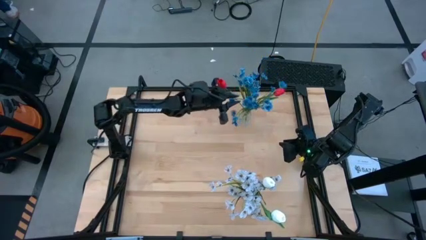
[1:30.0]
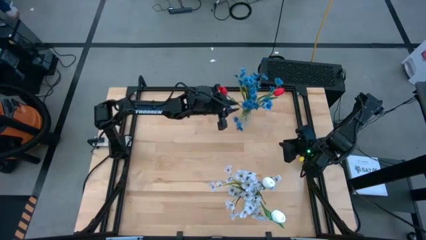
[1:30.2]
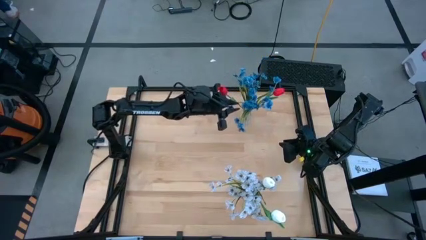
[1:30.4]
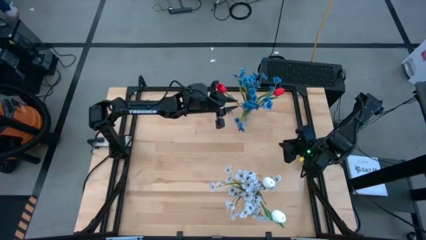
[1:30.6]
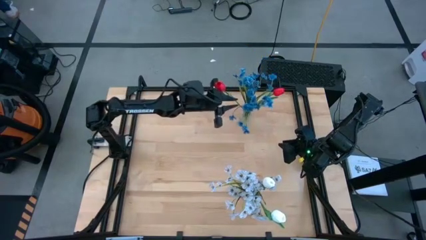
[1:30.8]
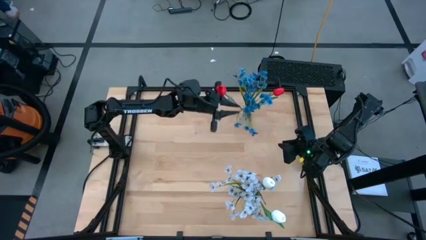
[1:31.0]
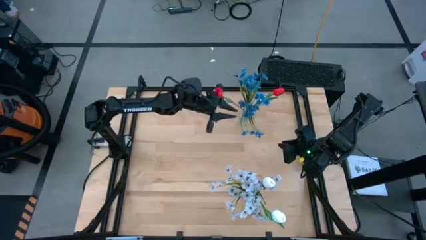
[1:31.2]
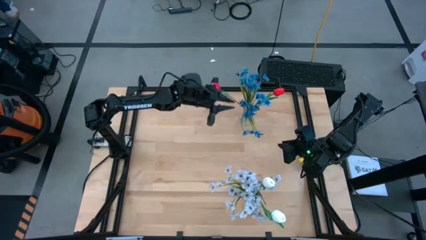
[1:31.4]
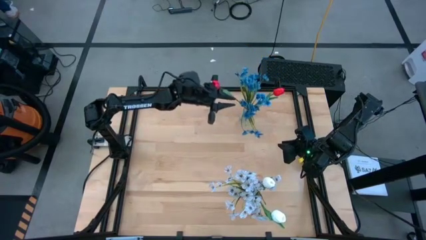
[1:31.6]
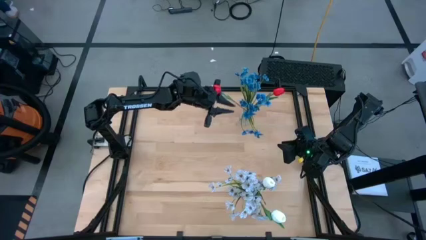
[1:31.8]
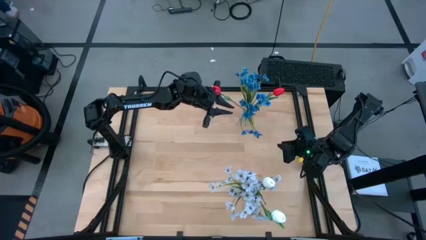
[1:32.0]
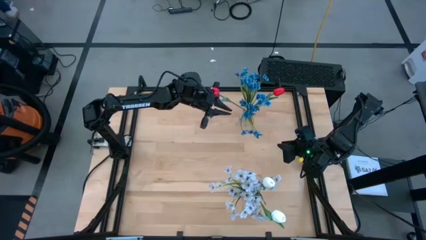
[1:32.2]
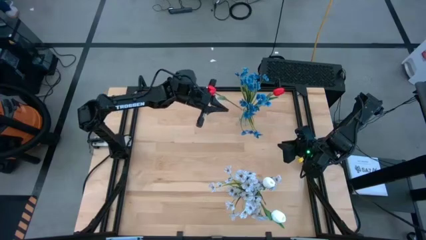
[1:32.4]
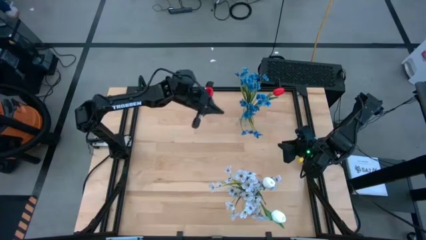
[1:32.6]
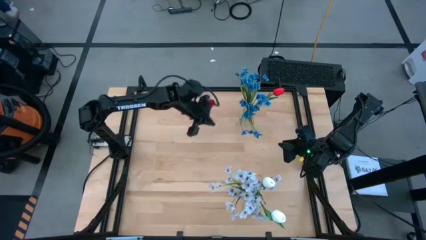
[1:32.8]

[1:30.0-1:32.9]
Task: Sort flowers into vase by color
Put the red flower into the transparent vase

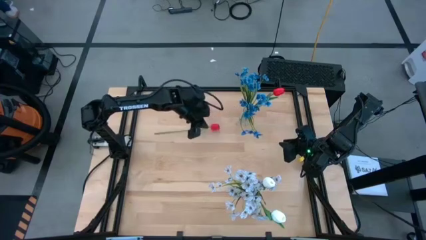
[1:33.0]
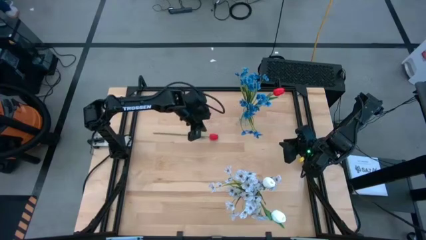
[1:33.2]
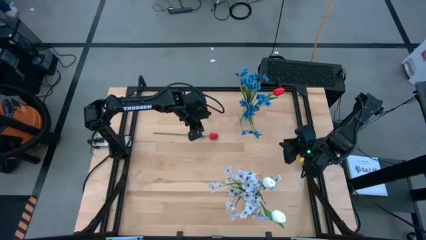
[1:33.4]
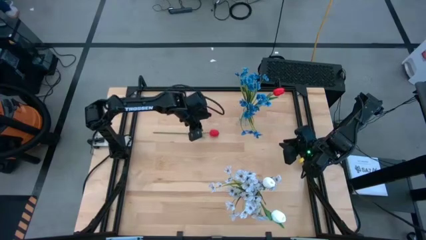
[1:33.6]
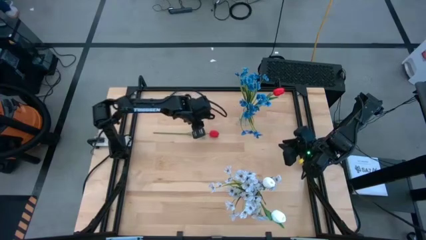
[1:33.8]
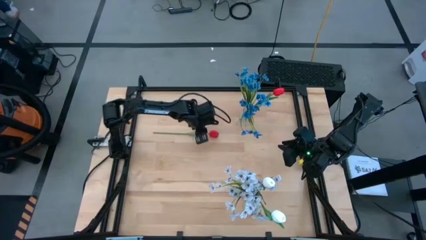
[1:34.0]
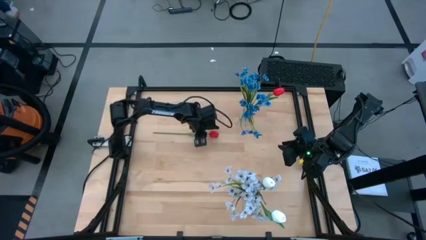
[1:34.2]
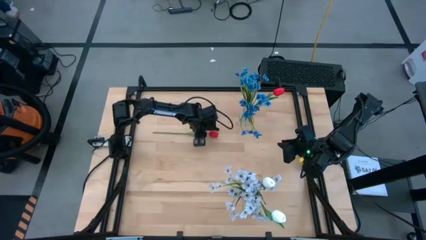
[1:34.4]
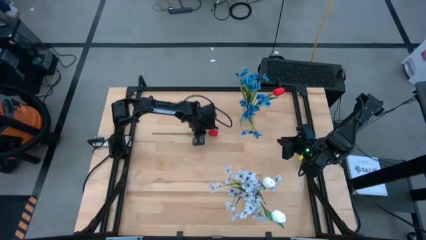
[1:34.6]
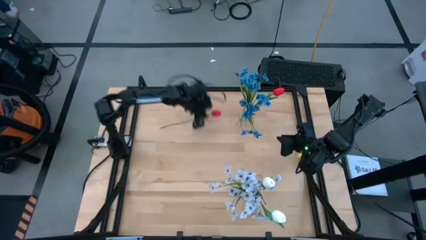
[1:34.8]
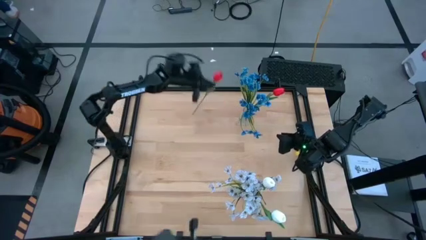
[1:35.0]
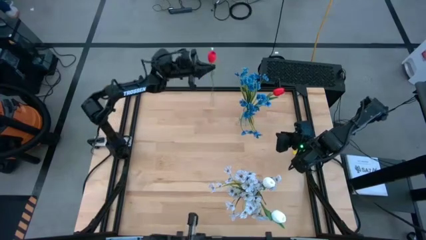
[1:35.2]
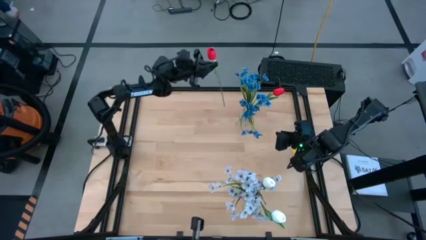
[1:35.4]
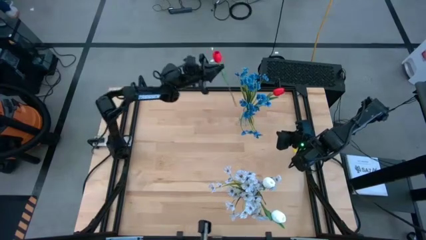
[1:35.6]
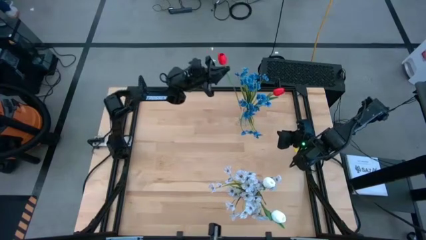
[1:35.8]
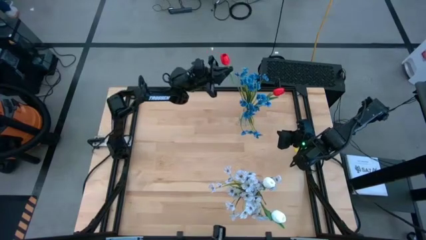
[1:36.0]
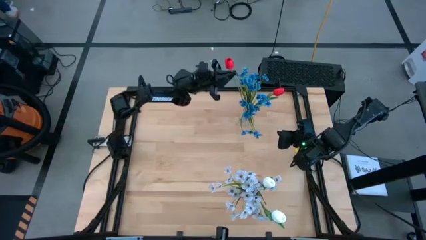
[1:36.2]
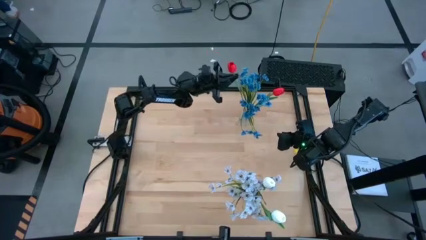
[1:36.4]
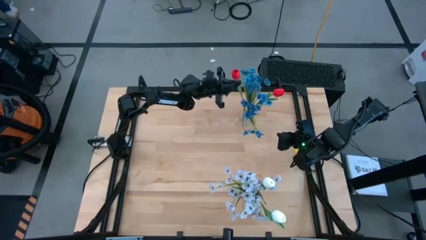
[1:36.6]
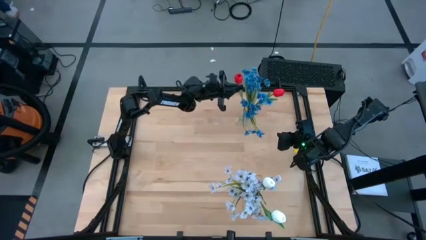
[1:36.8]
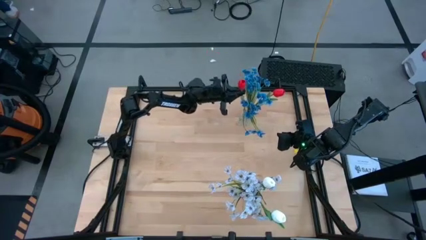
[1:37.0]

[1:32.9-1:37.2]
Put the red flower into the transparent vase

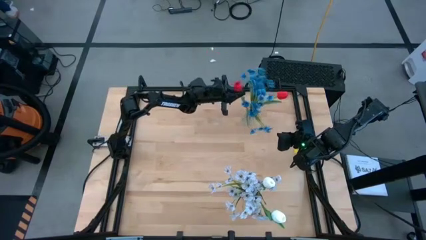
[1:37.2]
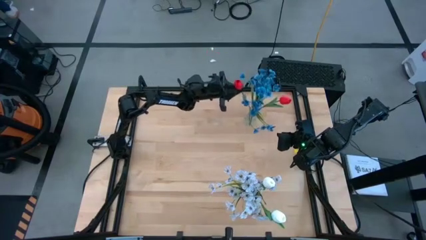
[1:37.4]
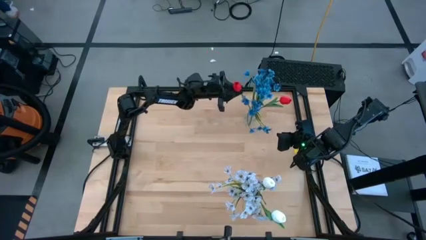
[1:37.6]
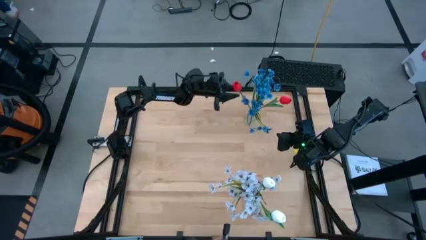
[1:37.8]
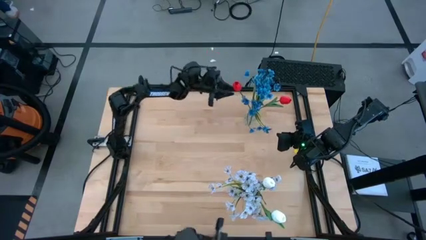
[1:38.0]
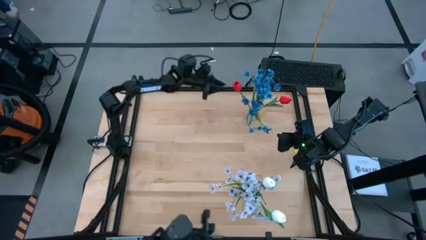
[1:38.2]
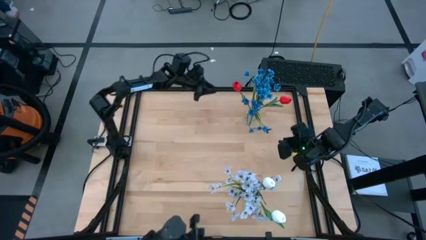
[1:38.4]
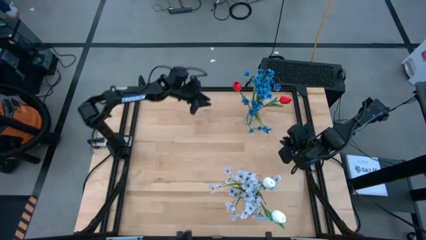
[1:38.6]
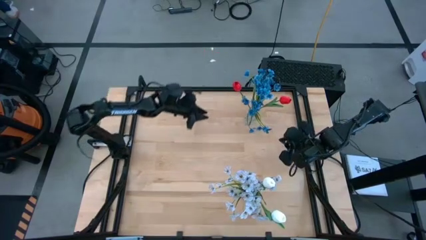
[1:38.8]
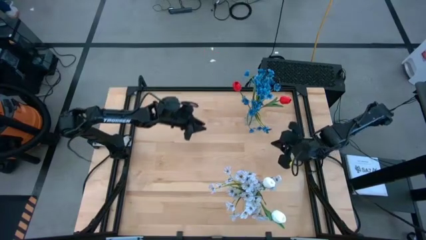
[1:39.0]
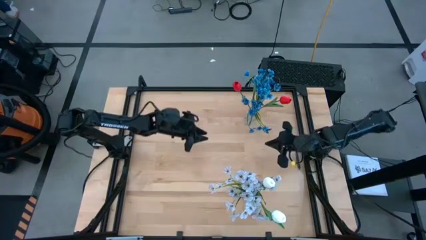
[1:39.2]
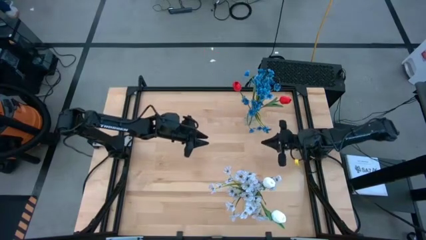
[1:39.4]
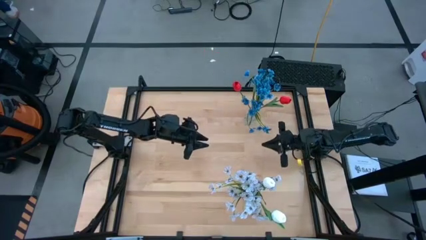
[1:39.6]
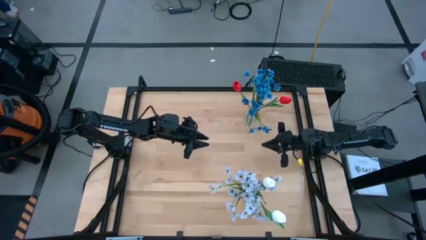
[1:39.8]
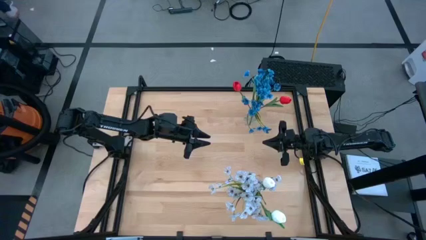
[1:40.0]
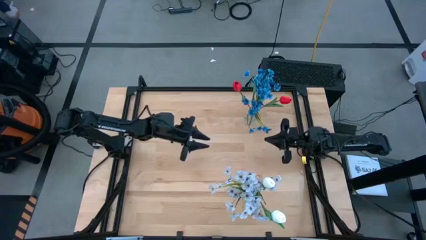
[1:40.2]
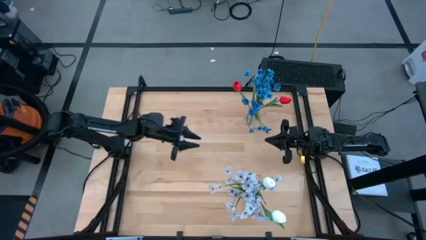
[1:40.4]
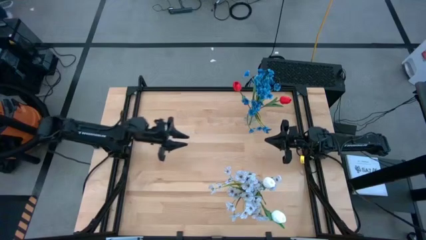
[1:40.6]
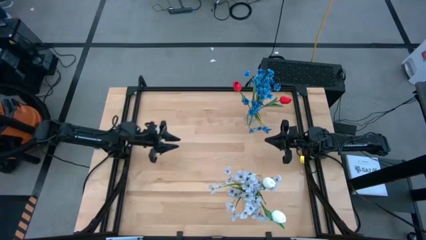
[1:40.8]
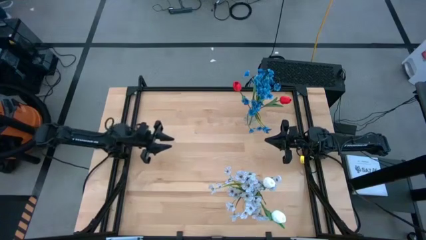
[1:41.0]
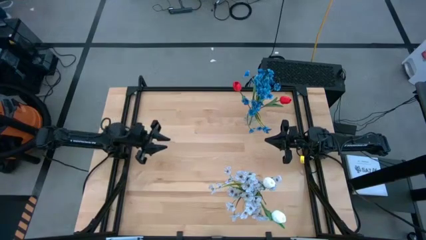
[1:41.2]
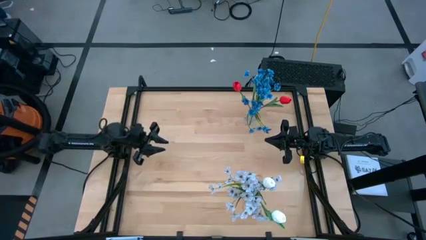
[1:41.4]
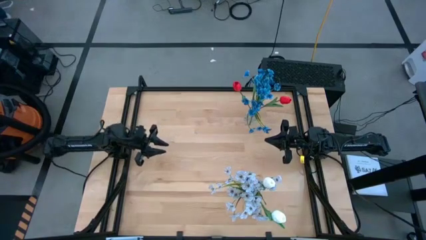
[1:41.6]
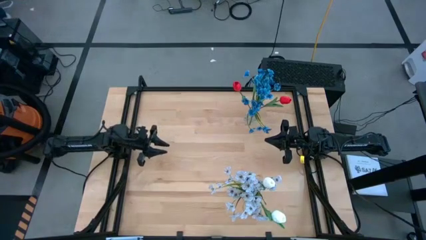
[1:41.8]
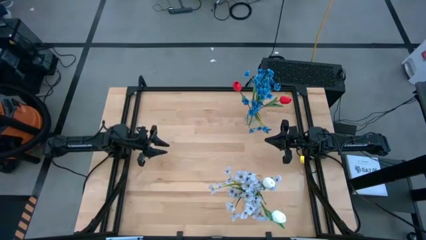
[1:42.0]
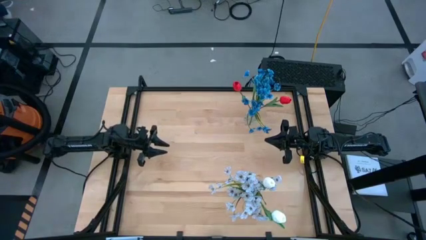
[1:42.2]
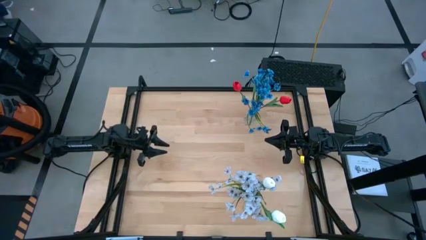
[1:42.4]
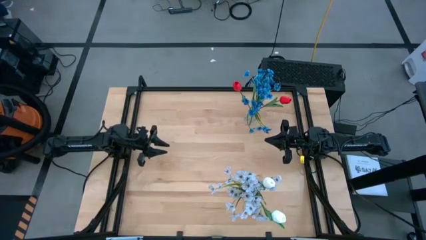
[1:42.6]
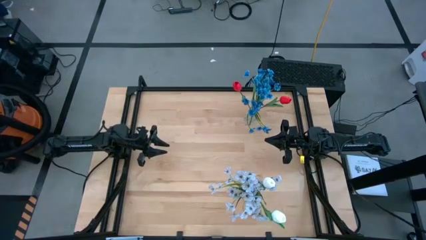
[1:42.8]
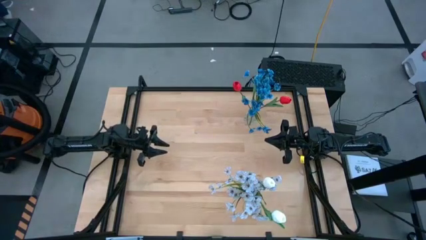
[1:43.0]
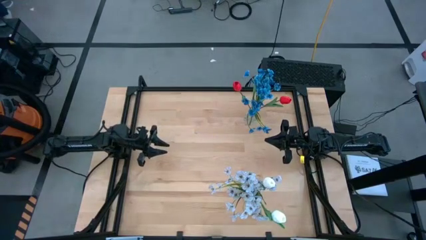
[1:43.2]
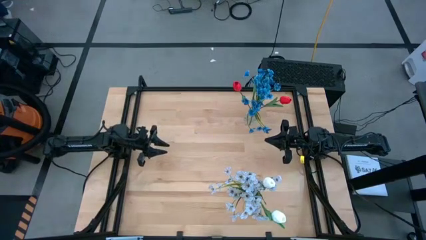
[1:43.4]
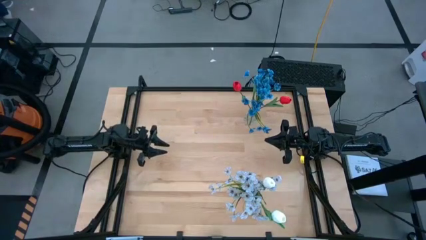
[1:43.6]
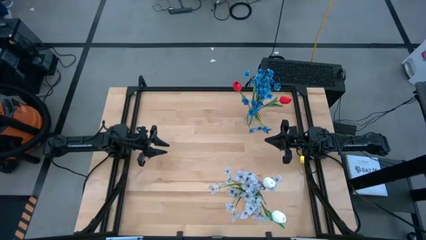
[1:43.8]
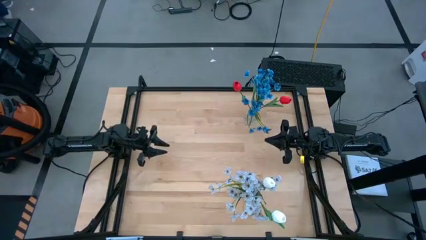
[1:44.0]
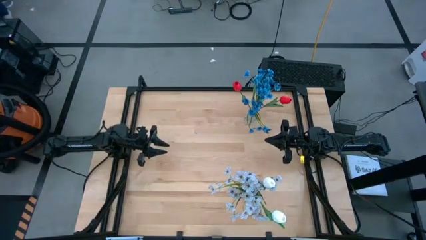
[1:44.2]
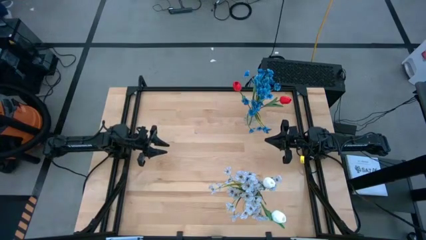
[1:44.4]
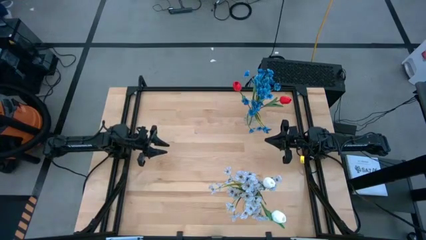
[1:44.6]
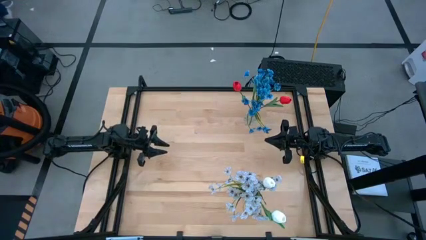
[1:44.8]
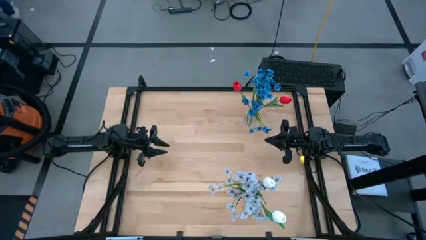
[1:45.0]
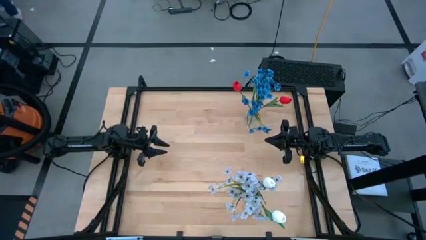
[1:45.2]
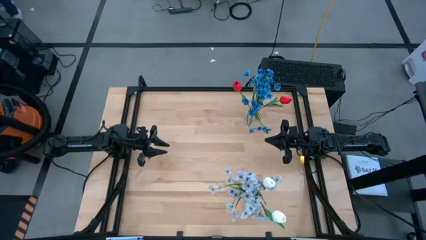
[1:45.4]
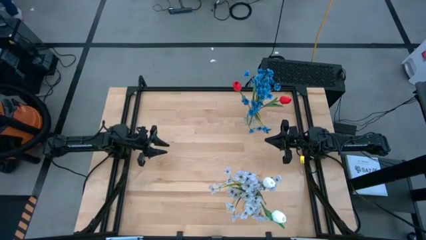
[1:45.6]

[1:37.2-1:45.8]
Return to Home Position
